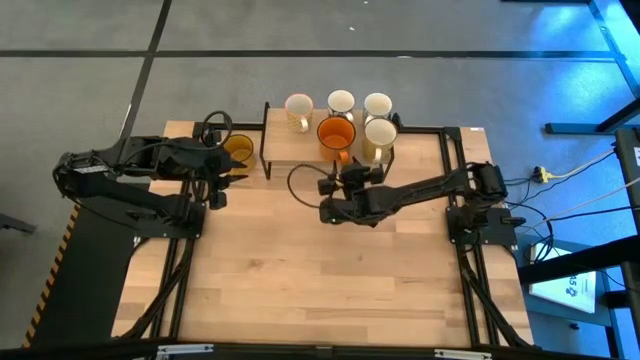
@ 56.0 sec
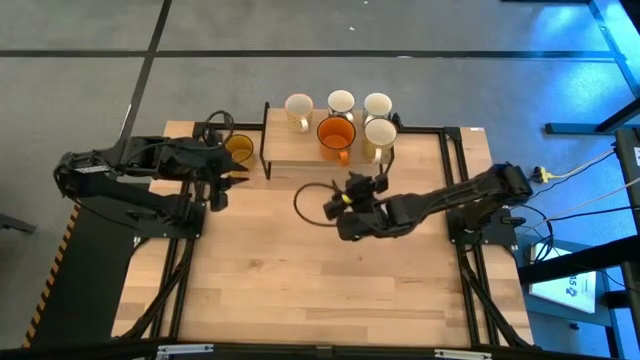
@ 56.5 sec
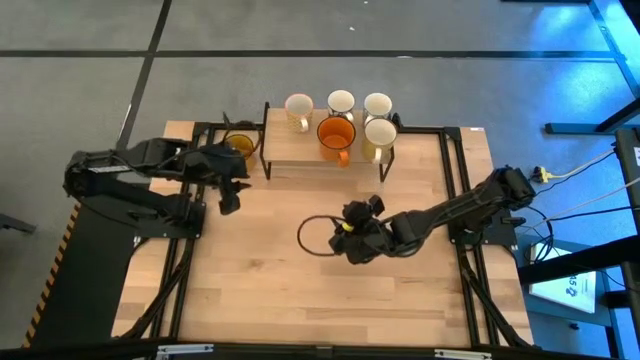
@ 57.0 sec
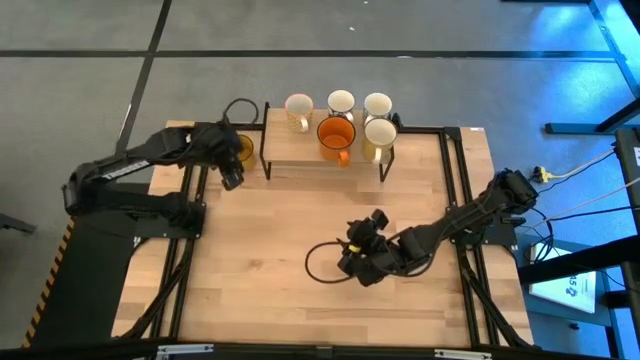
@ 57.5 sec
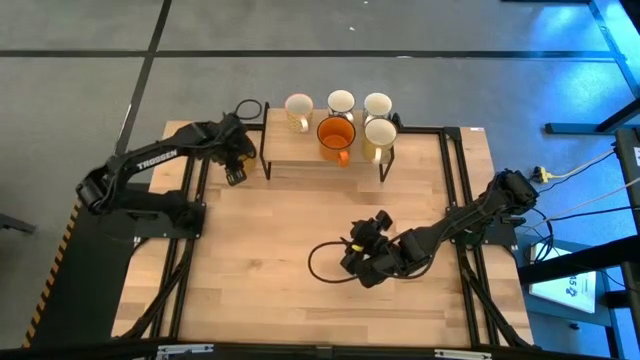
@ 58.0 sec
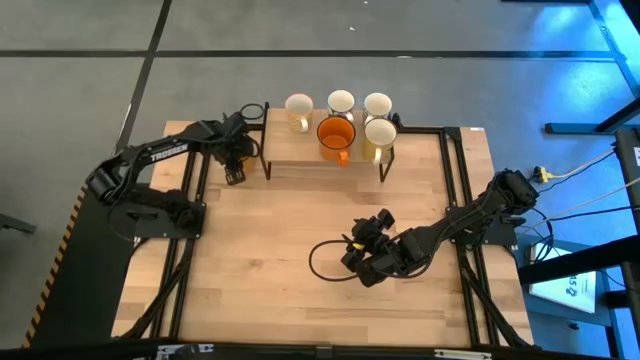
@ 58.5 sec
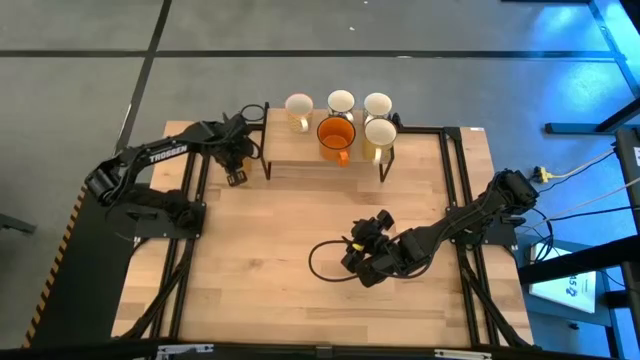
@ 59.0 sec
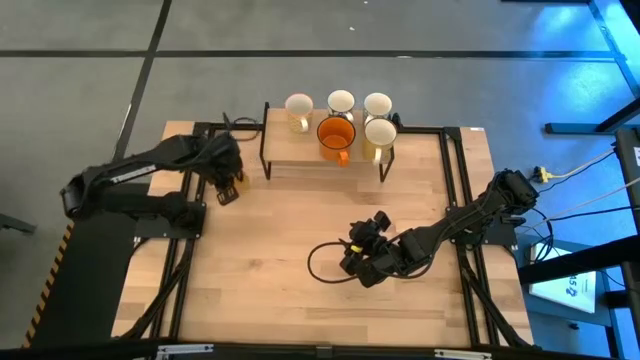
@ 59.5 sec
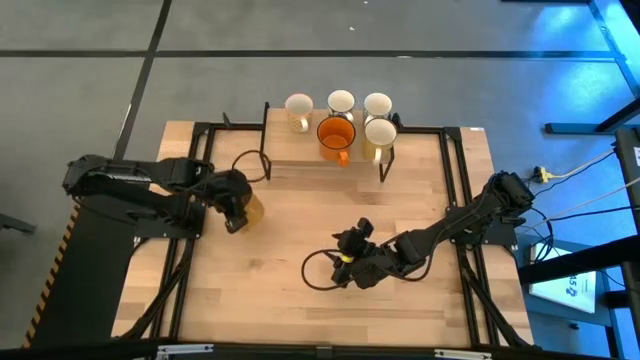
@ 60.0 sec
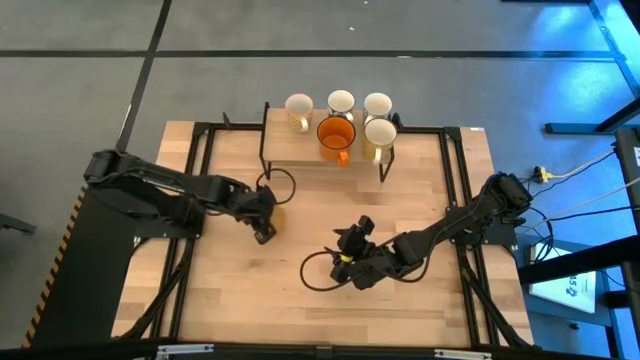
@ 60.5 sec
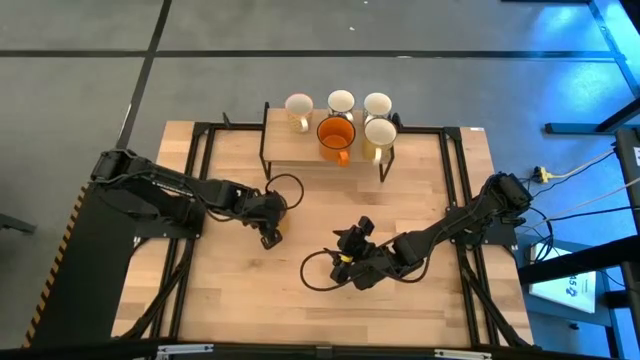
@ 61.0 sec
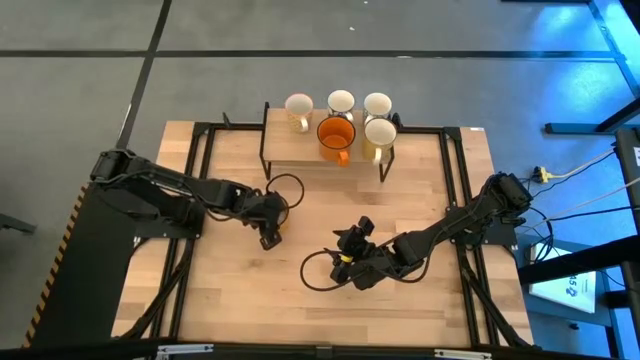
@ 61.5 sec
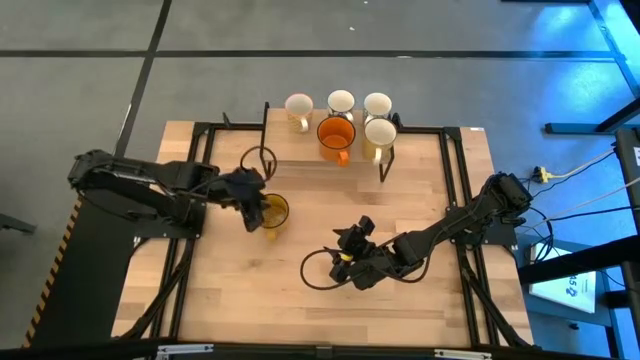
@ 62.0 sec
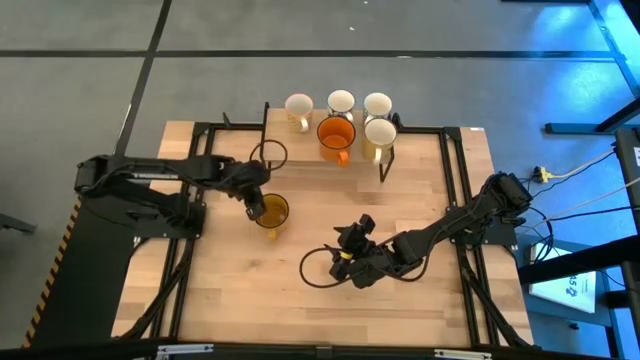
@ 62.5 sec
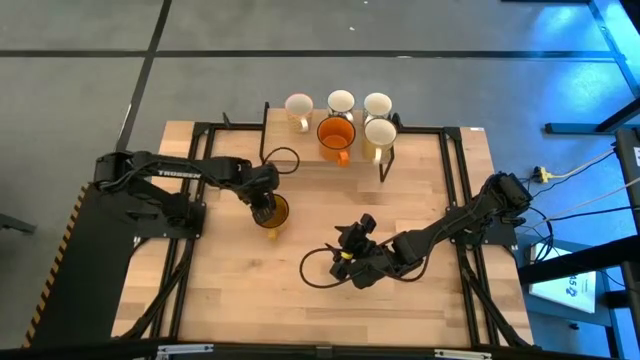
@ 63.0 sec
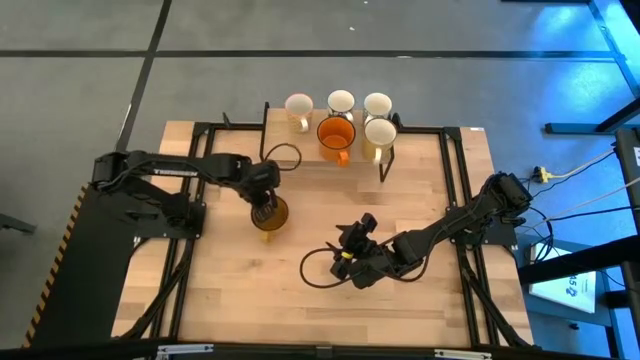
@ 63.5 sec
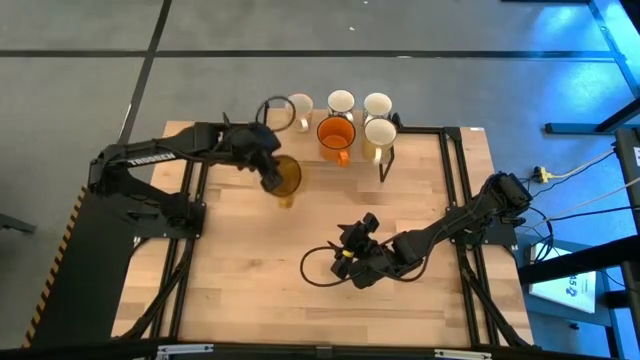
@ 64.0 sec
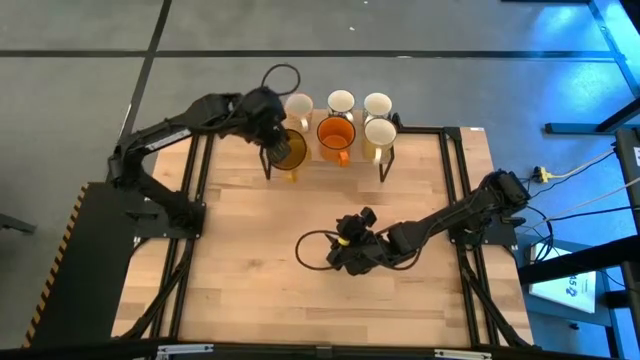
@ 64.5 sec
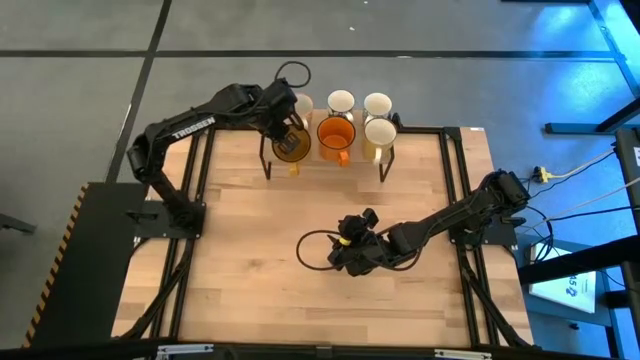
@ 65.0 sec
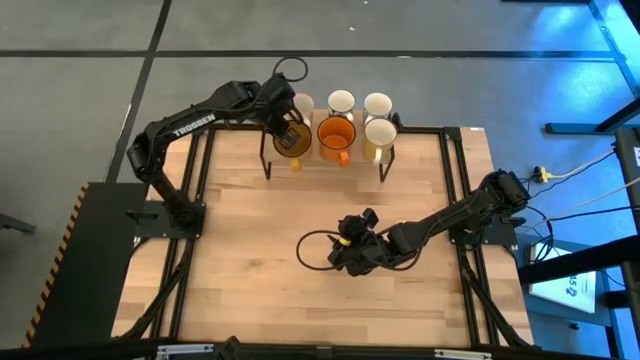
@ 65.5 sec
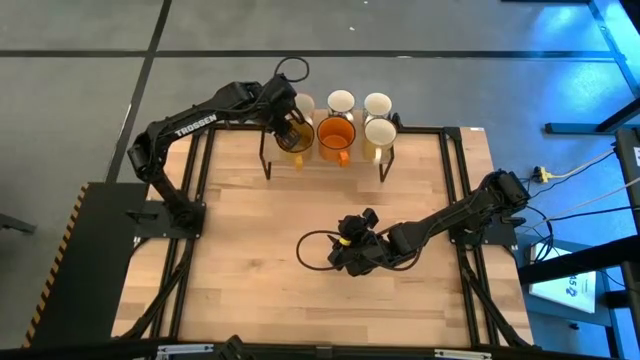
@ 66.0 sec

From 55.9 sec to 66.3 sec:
Task: Place coffee mugs
Put the yellow mug on the shelf

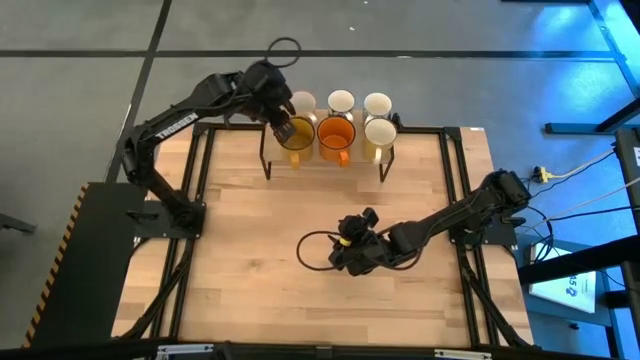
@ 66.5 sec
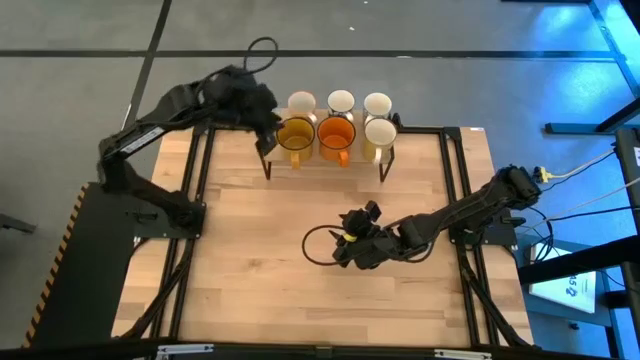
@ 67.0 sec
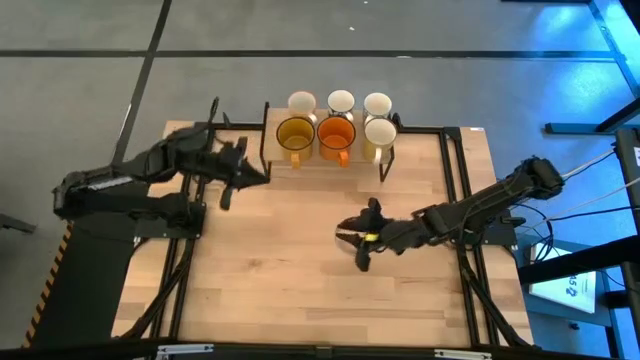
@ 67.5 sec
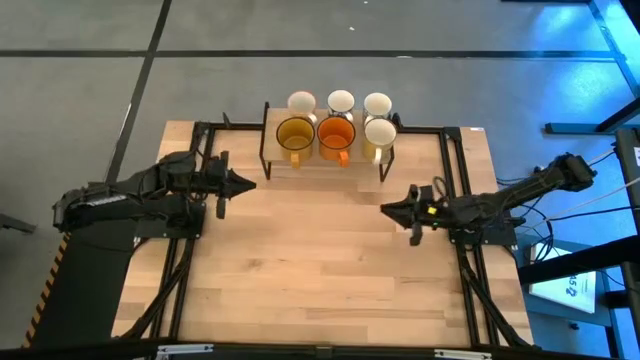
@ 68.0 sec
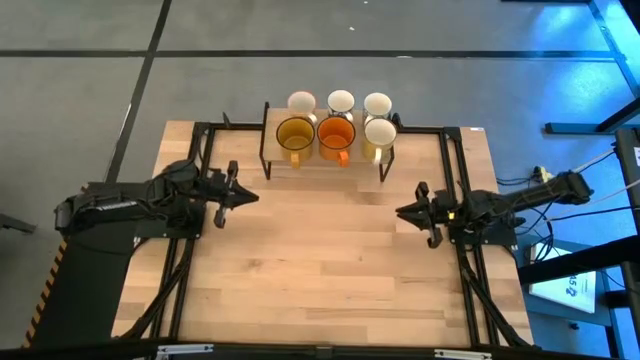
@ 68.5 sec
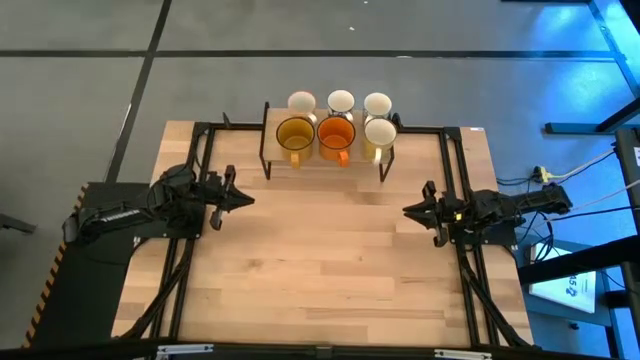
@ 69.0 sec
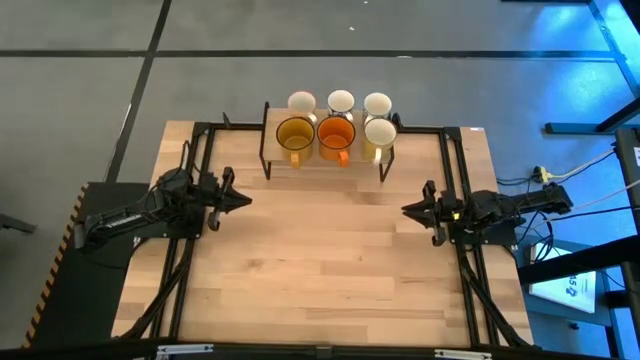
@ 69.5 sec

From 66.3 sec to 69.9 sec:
Return to Home Position

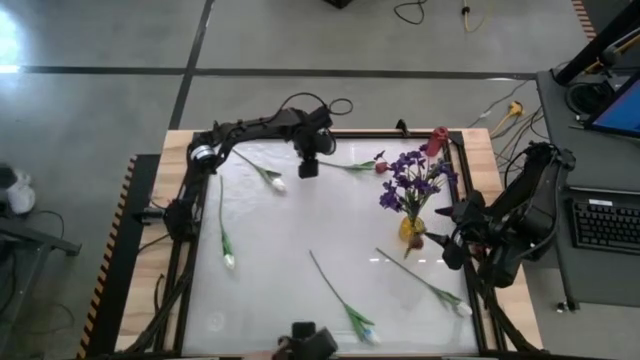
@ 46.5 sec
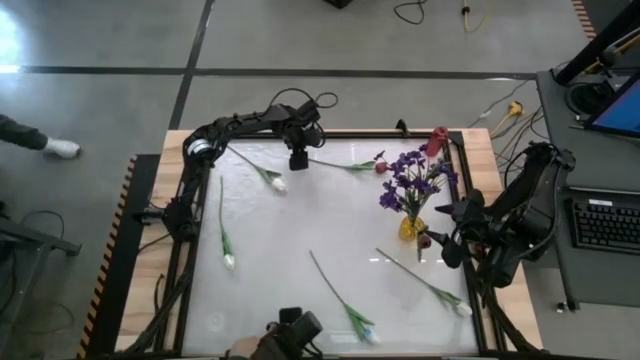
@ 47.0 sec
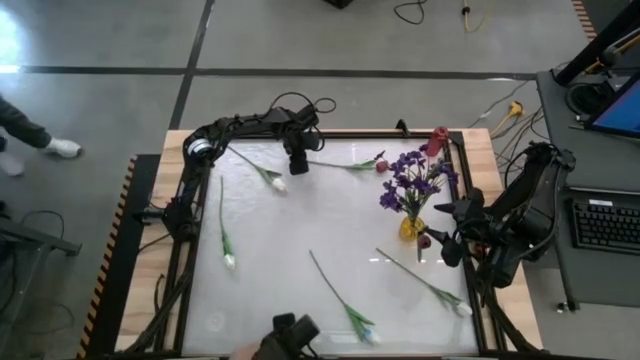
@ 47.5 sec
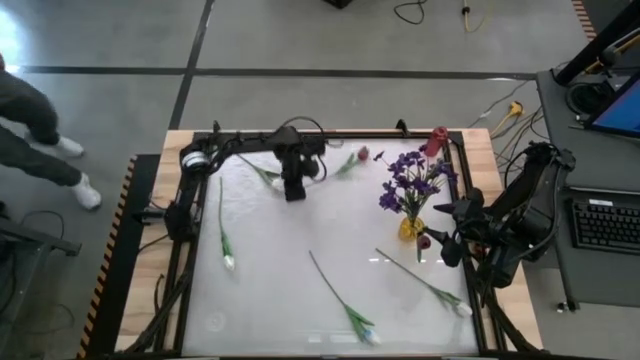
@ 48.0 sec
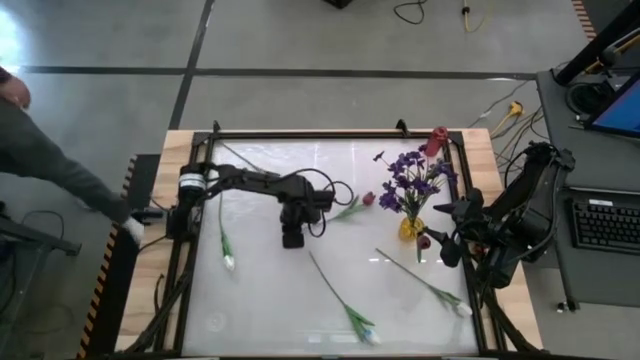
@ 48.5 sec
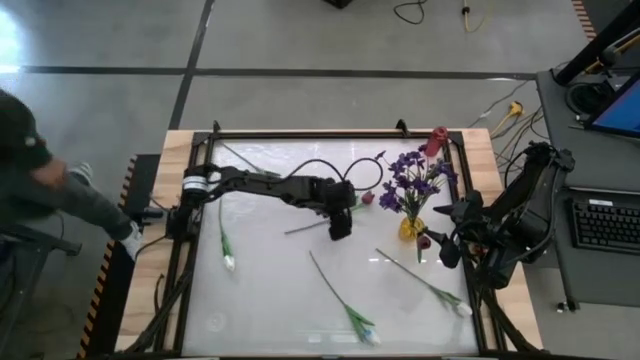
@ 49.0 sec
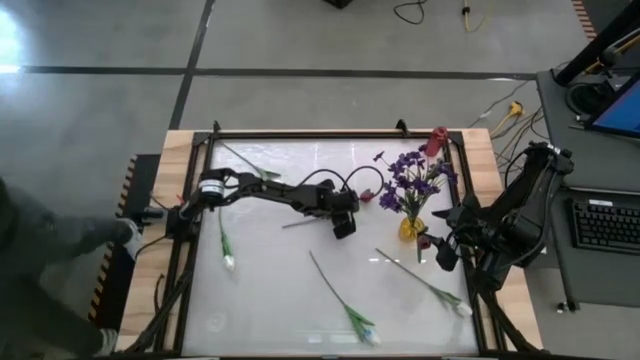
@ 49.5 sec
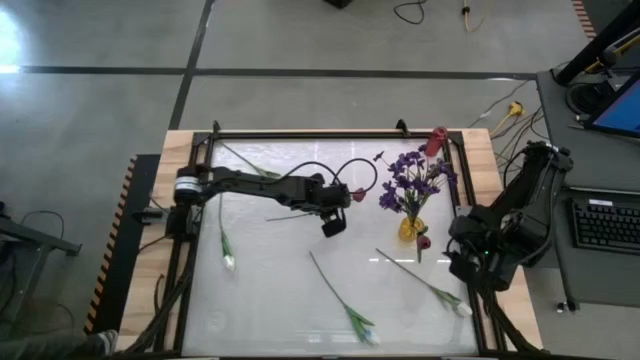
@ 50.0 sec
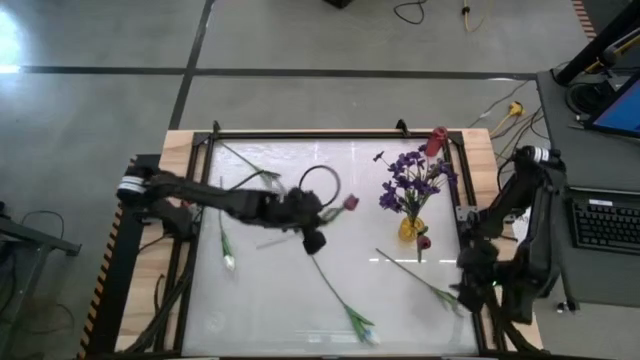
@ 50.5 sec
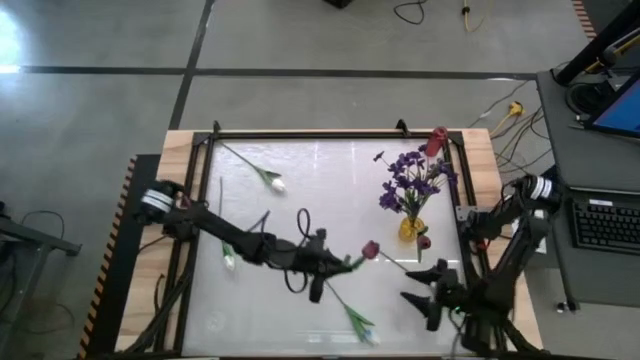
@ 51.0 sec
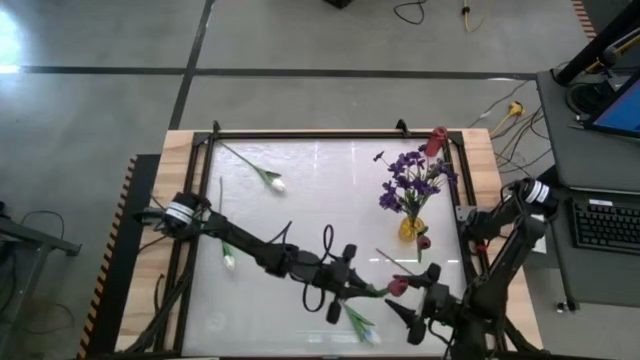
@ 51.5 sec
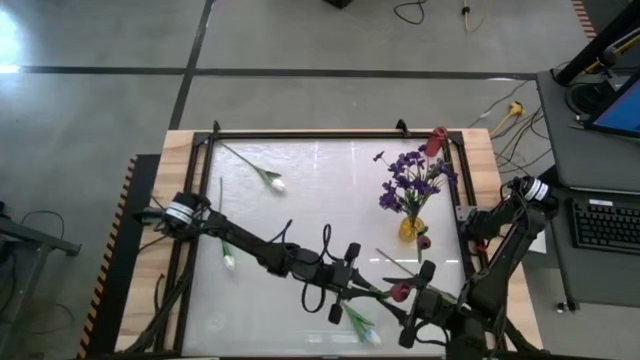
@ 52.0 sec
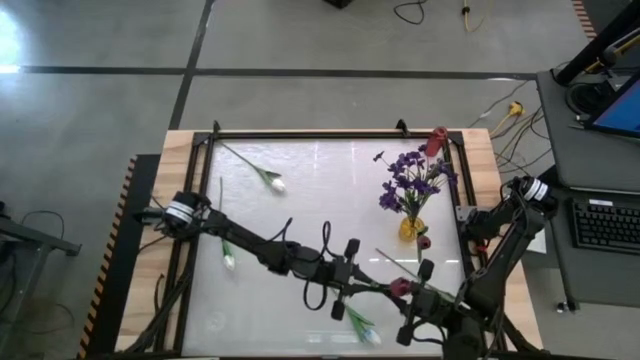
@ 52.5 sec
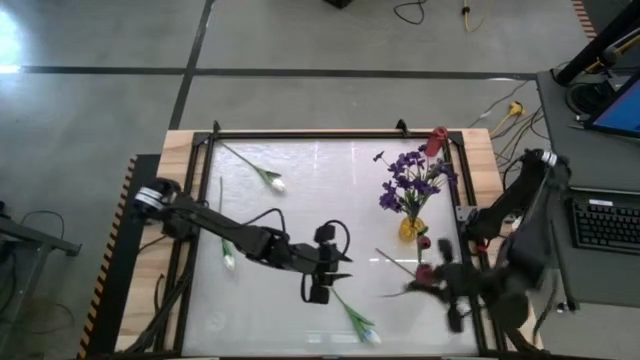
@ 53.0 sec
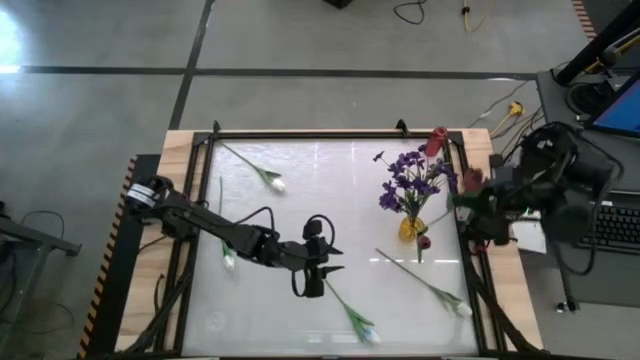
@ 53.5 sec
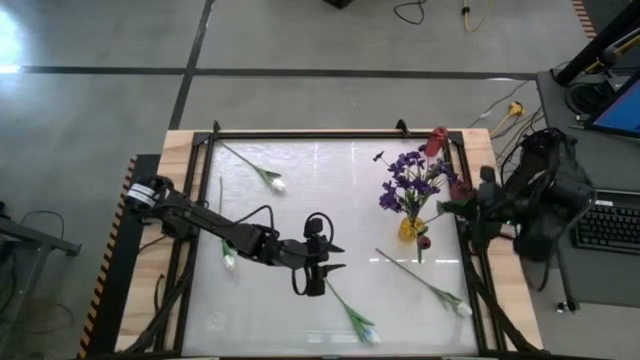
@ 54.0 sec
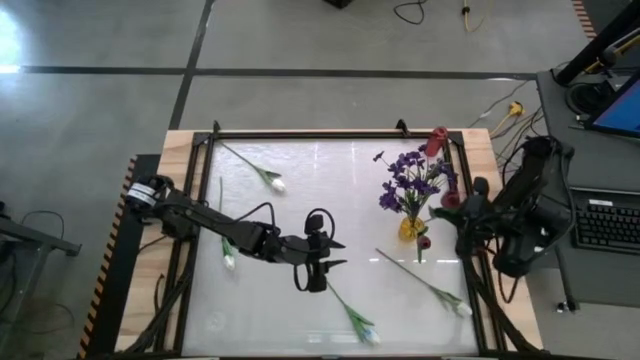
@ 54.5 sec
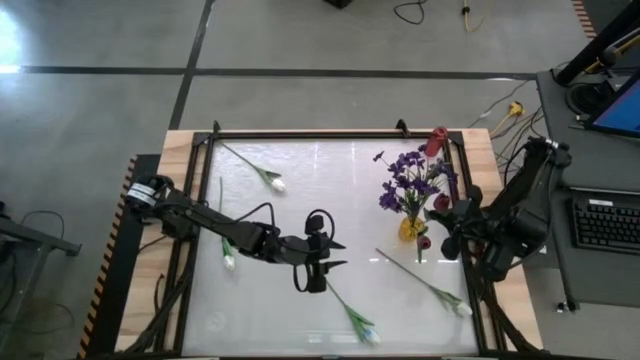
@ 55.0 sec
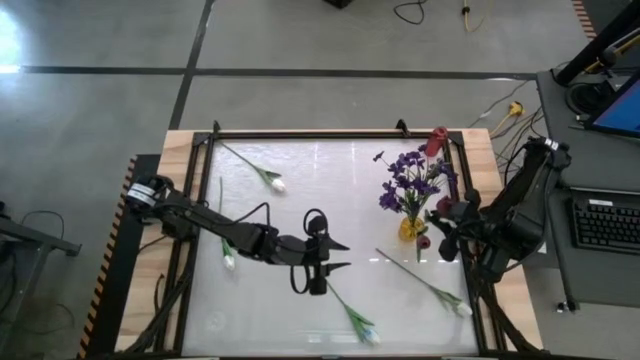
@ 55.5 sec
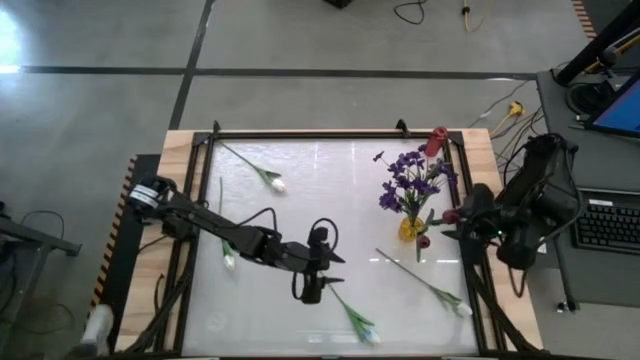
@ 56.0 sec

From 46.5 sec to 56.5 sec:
Task: Sort flowers into vase by color
Put the red flower into the yellow vase
